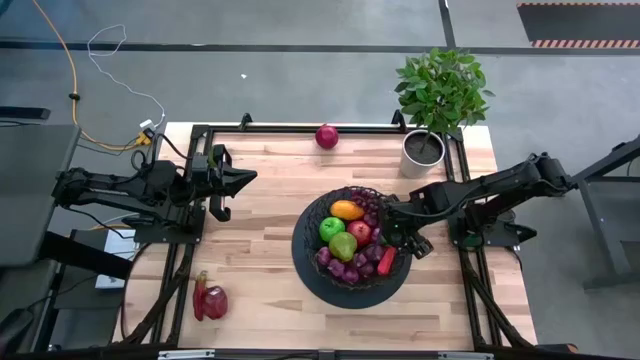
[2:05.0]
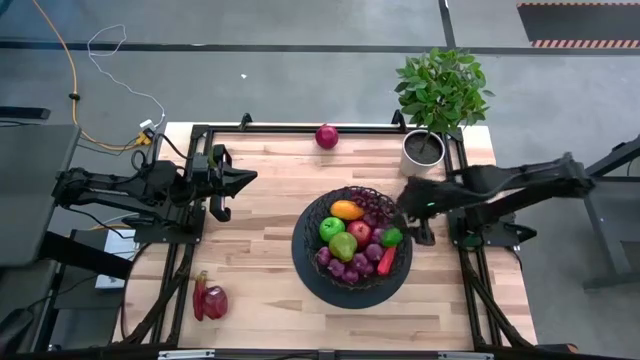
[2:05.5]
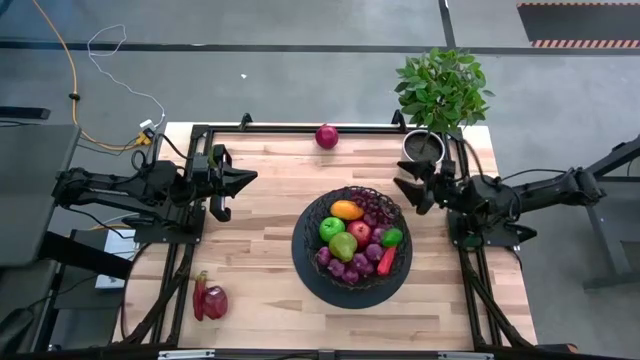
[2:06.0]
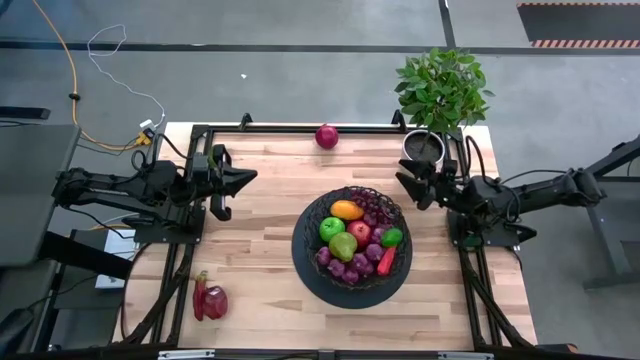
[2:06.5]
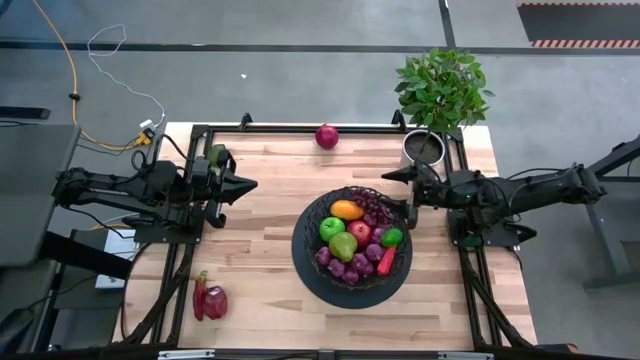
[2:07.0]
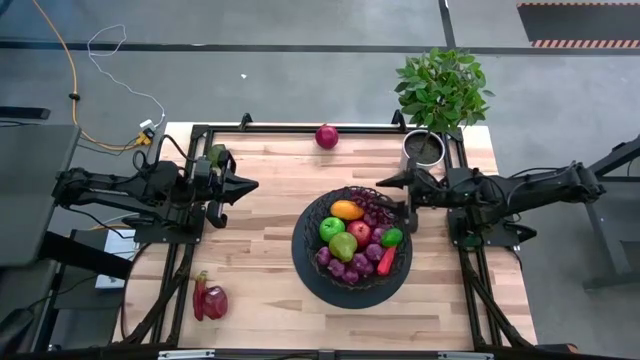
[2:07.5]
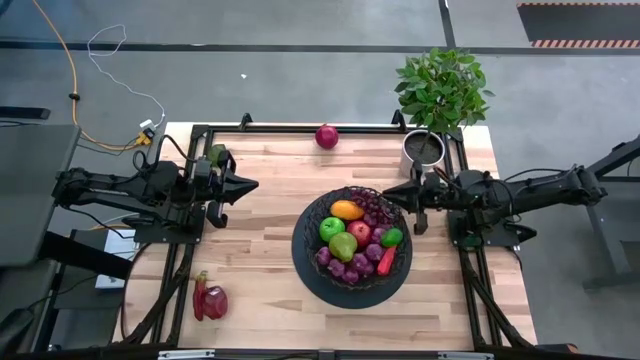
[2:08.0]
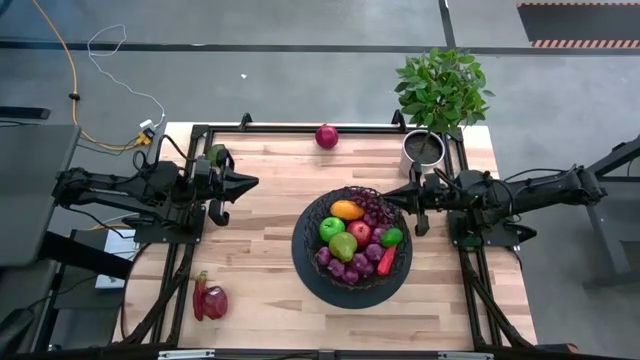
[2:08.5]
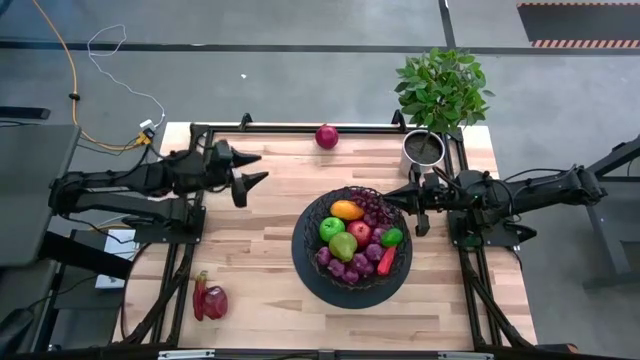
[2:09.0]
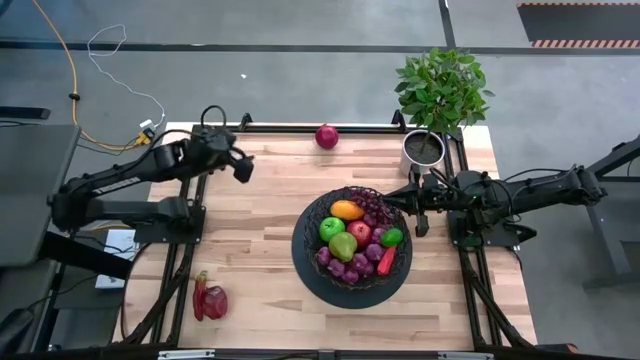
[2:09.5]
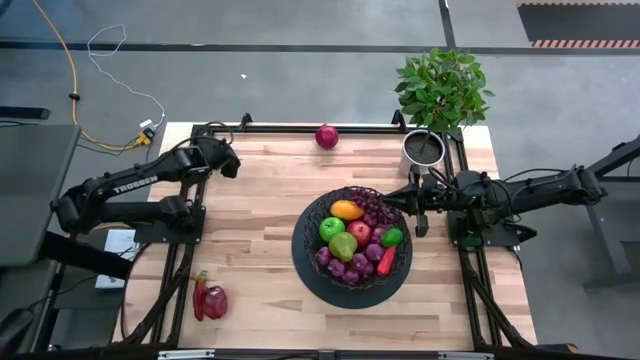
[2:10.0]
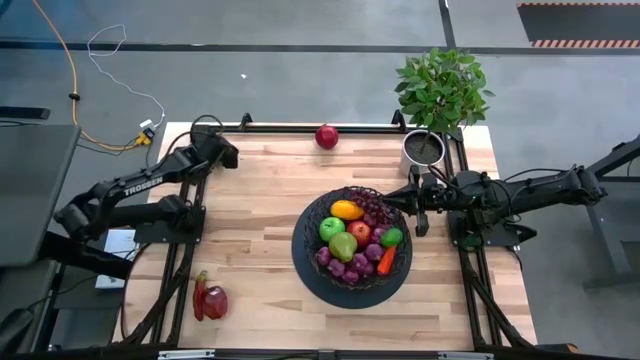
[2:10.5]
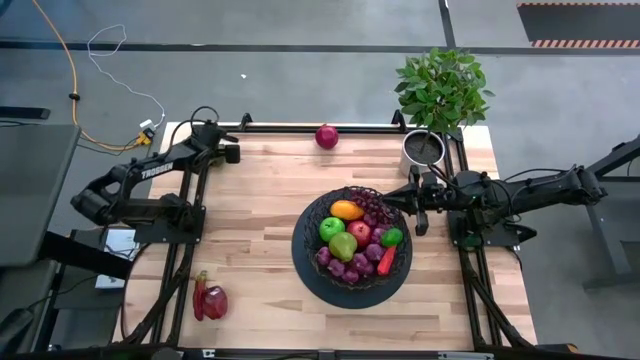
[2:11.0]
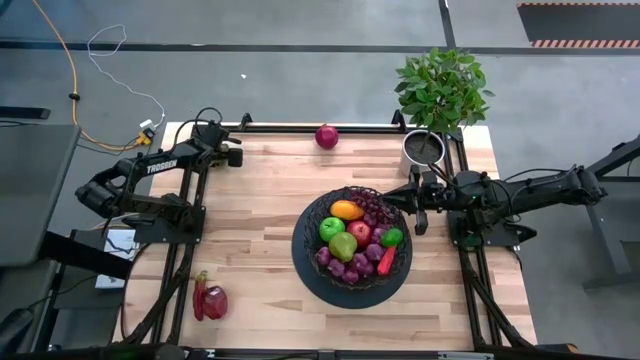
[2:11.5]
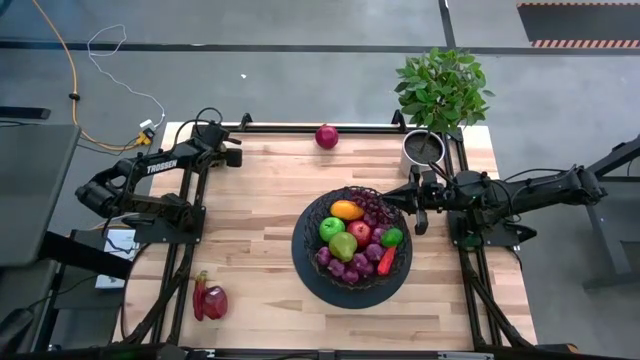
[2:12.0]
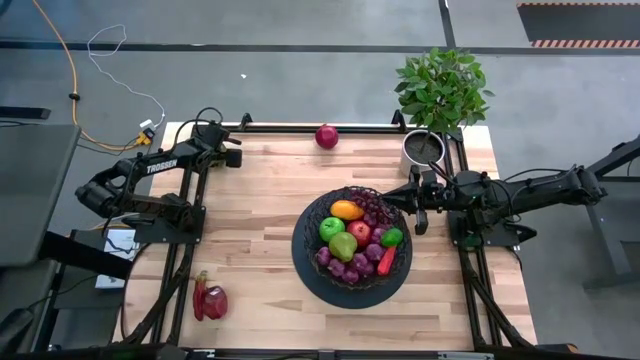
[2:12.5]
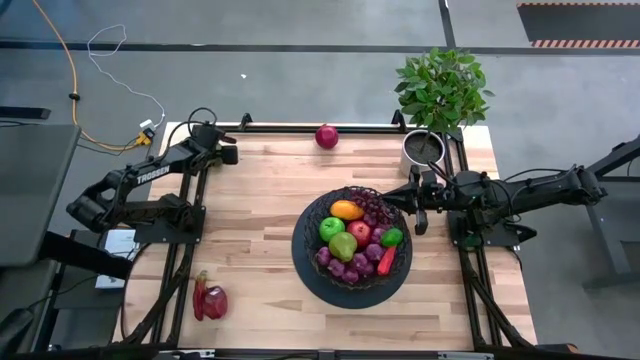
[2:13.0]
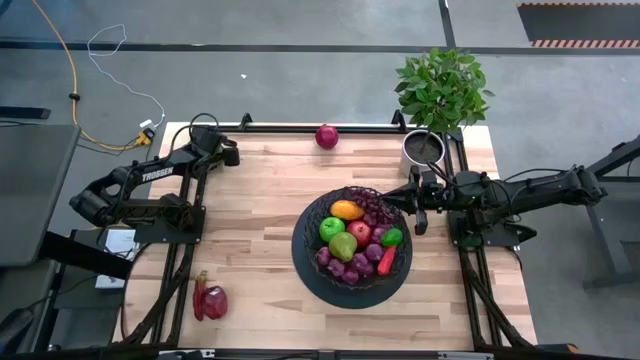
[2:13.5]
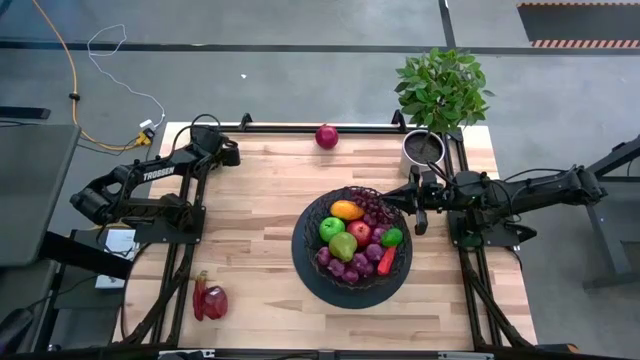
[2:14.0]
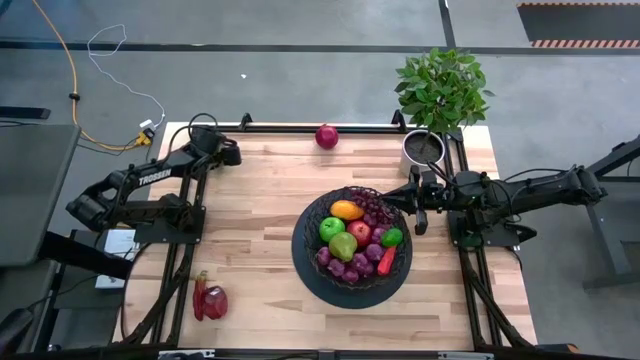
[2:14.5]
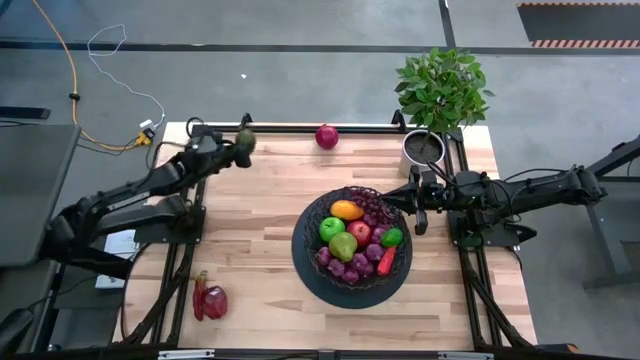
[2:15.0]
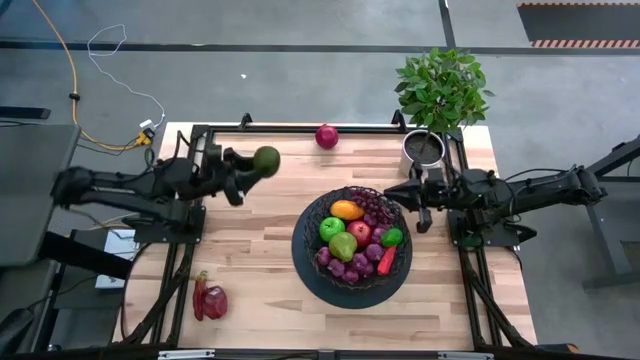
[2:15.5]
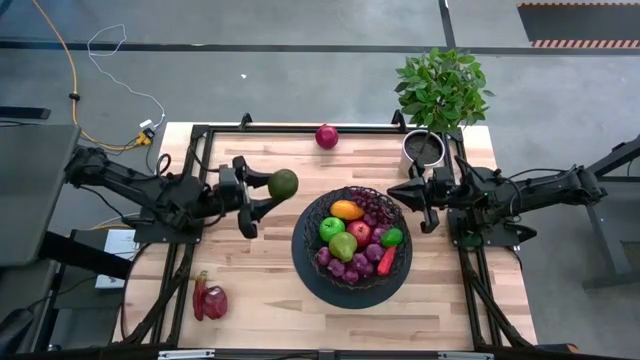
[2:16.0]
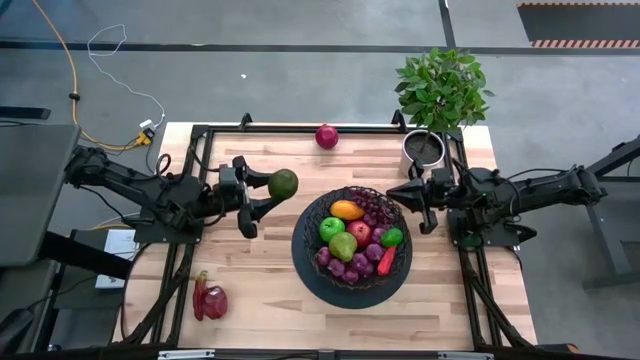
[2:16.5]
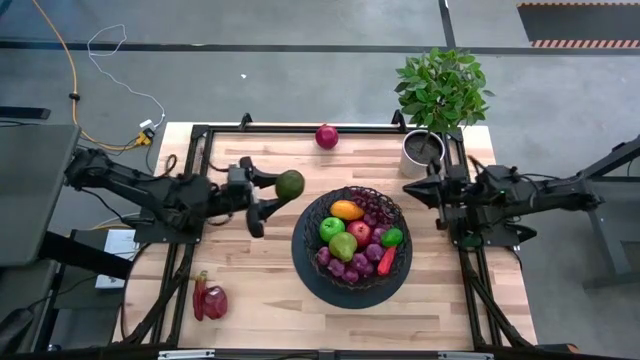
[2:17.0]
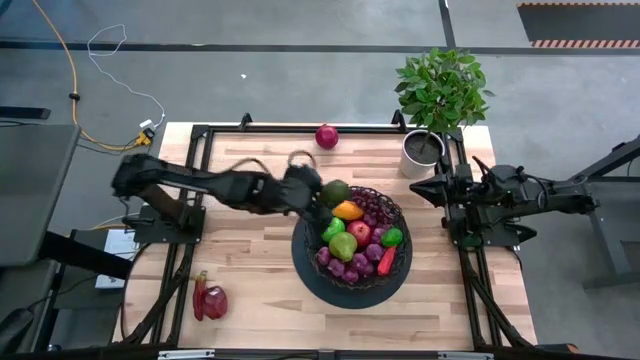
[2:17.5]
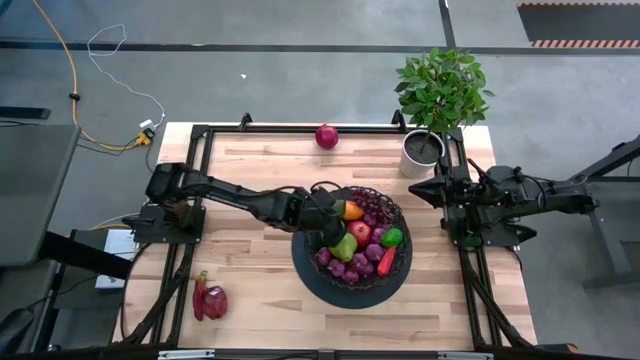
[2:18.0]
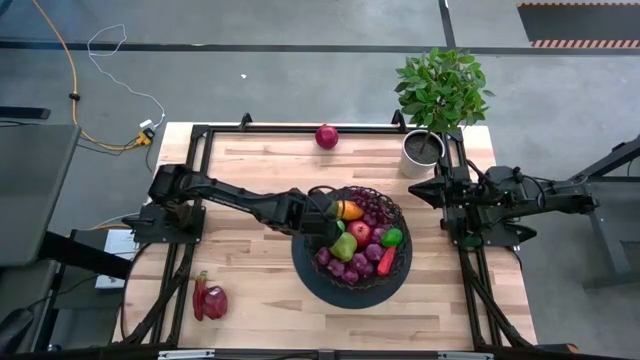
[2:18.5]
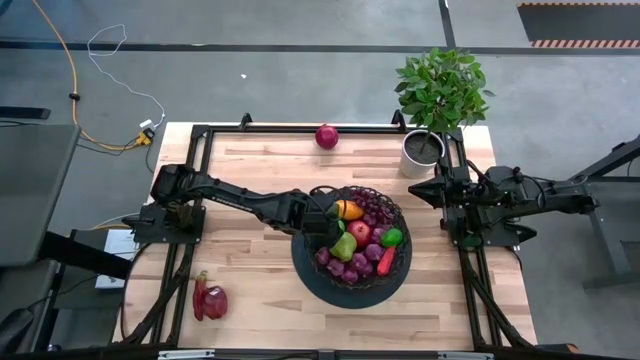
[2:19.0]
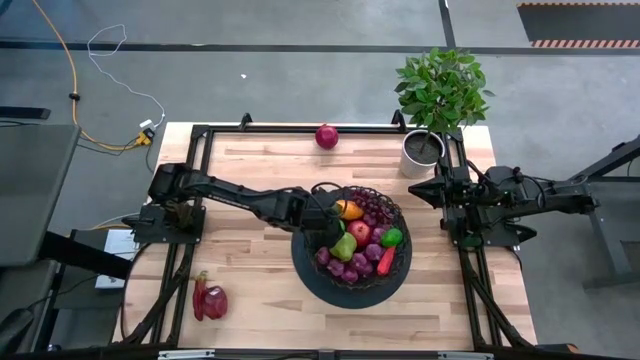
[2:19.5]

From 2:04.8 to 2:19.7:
Task: Build produce basket
Put the green lime into the basket

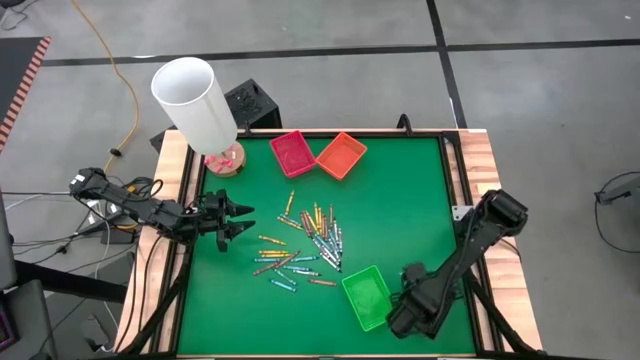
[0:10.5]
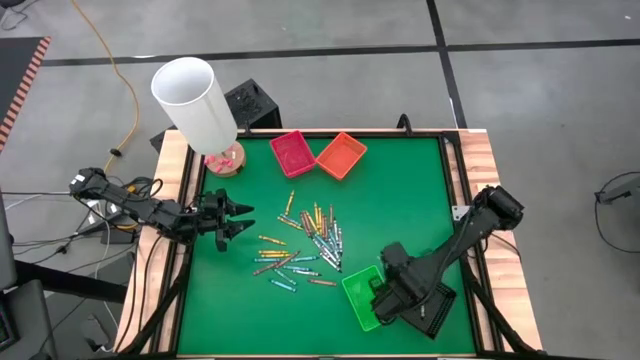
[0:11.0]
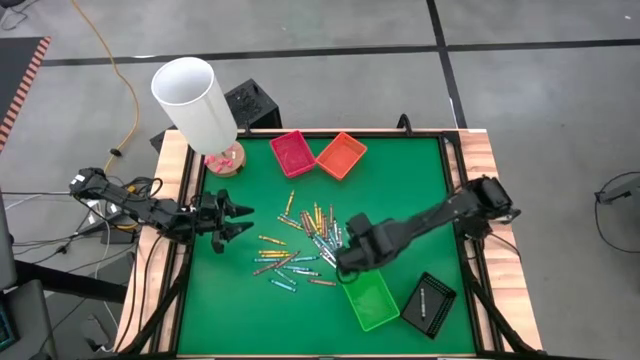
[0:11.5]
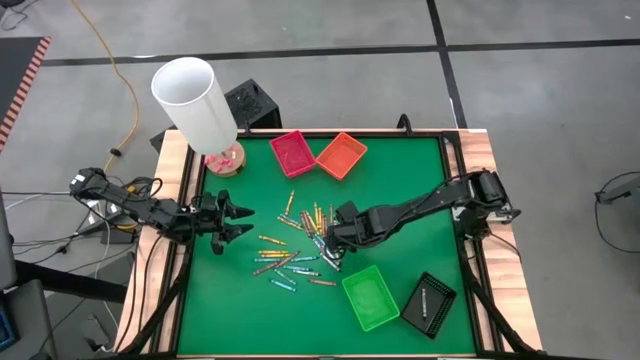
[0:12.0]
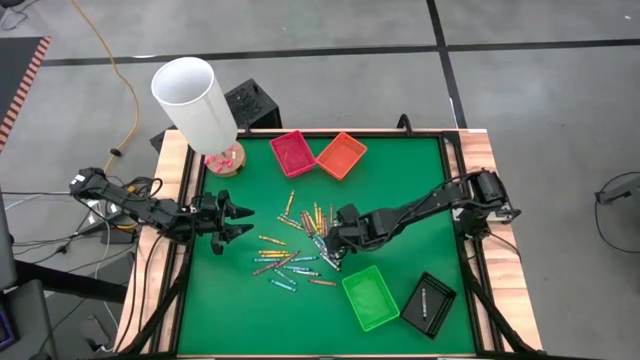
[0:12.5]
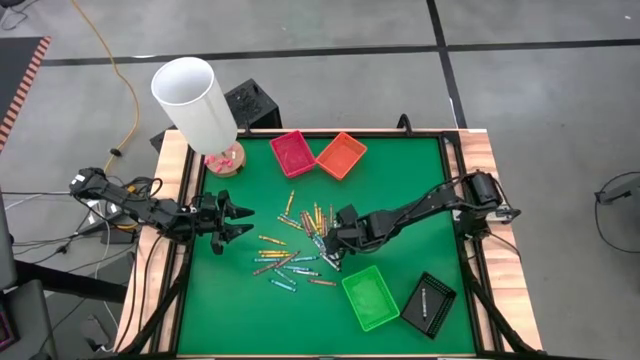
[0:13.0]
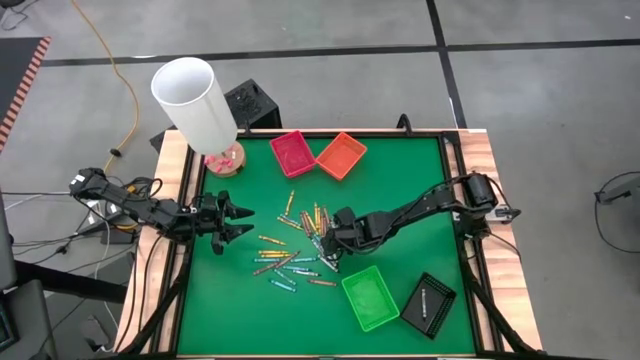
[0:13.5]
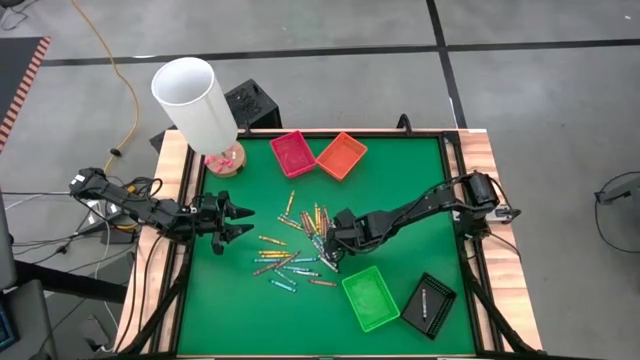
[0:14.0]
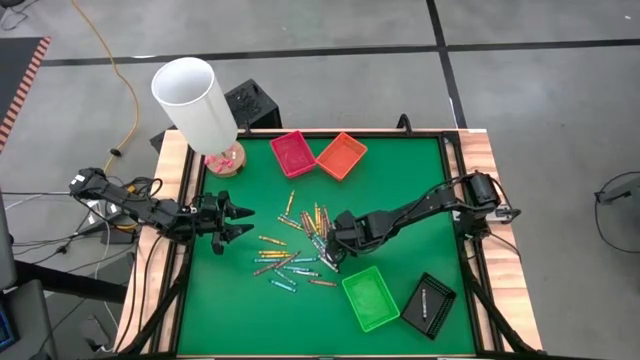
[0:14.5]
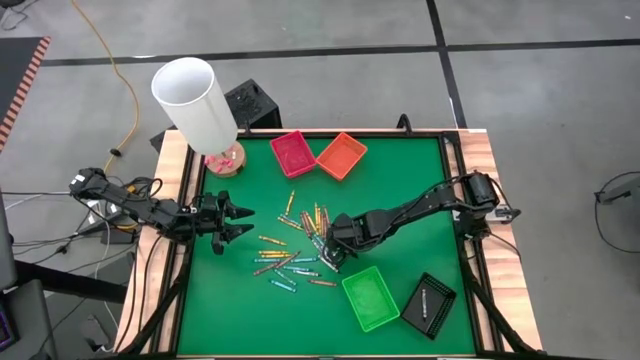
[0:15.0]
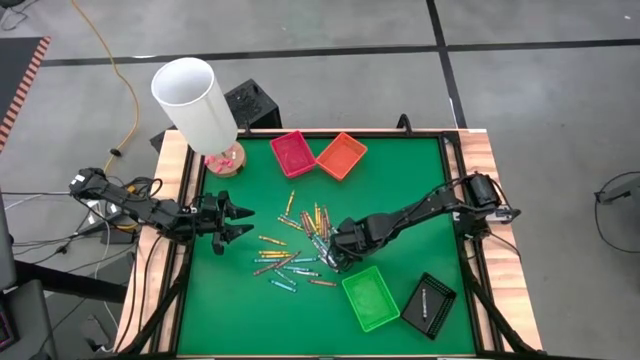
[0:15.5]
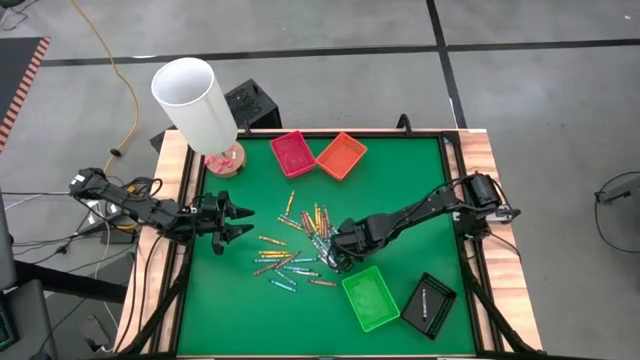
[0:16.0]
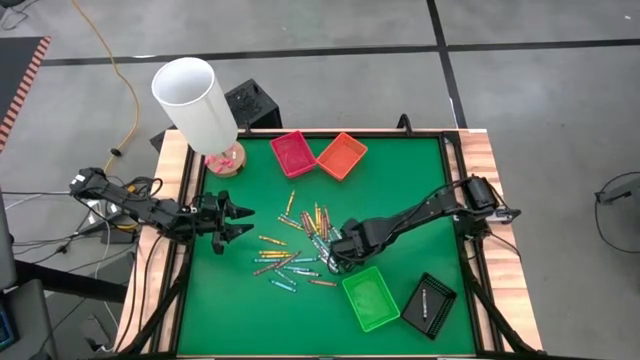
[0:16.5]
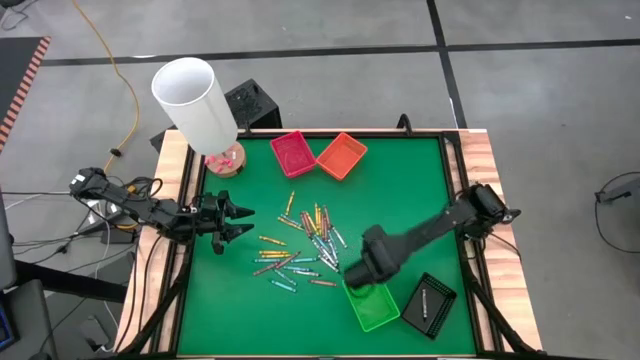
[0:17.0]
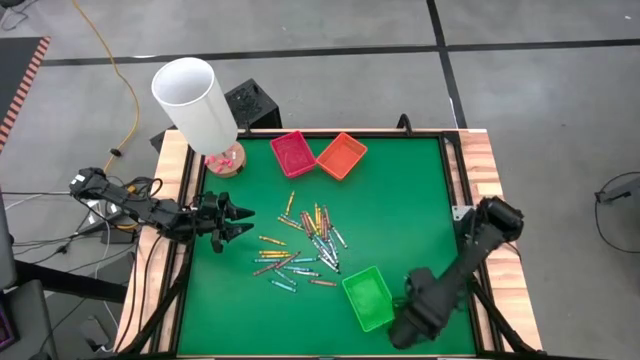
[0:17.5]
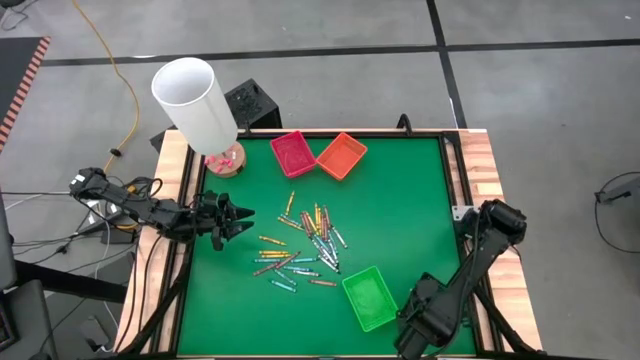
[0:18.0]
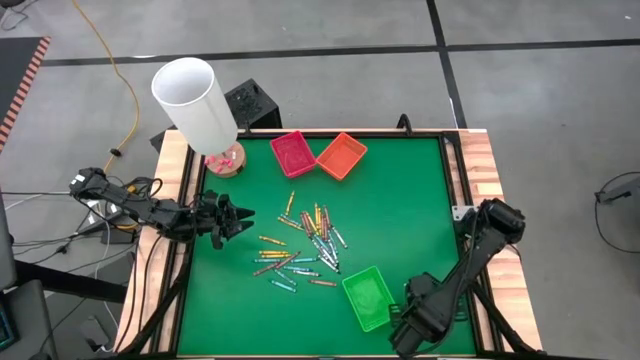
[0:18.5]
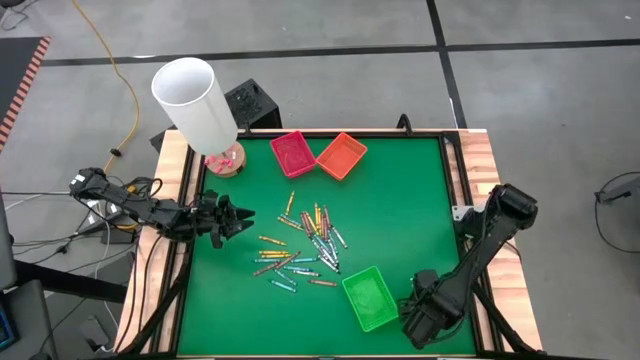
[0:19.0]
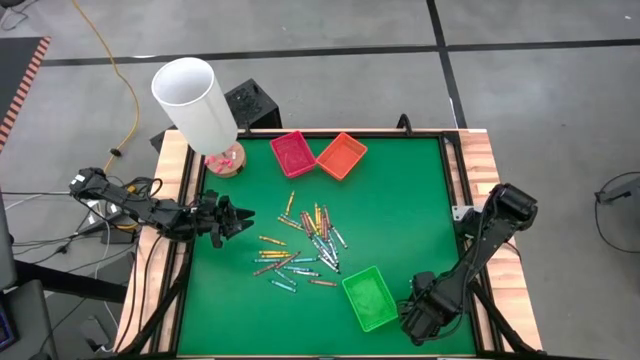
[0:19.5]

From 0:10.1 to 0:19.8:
Task: Sort crayons
Put the black crayon into the black bin
